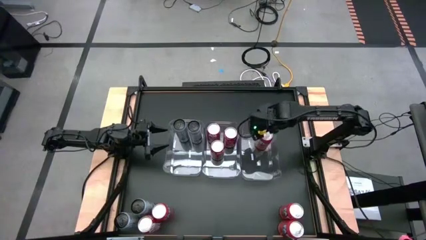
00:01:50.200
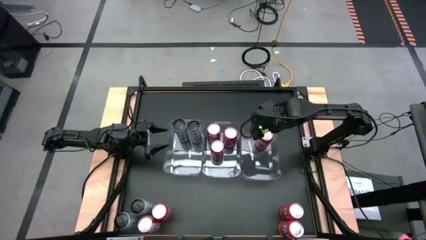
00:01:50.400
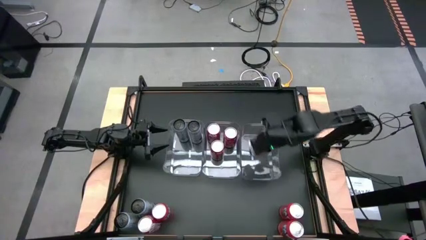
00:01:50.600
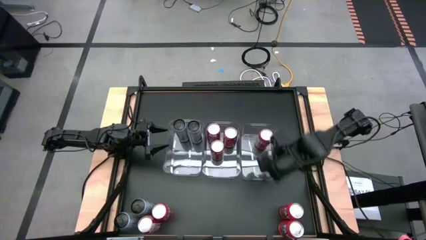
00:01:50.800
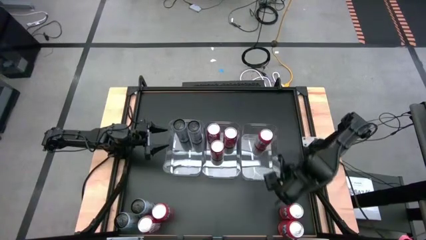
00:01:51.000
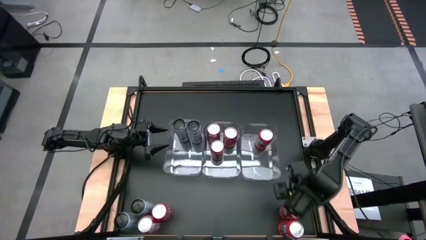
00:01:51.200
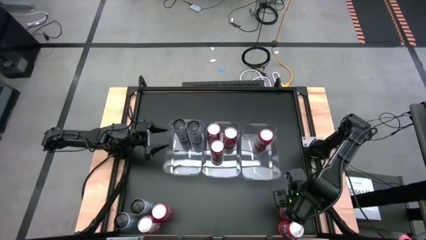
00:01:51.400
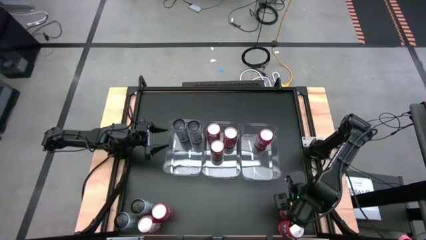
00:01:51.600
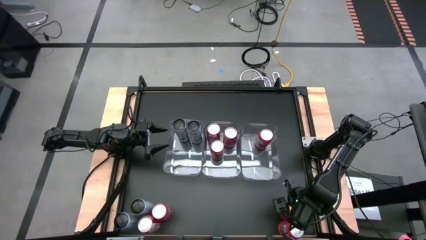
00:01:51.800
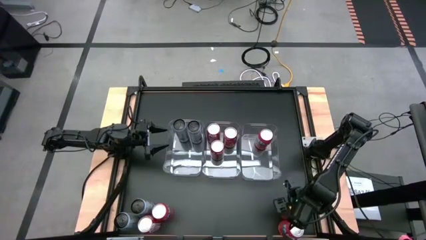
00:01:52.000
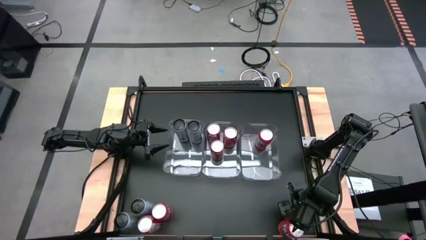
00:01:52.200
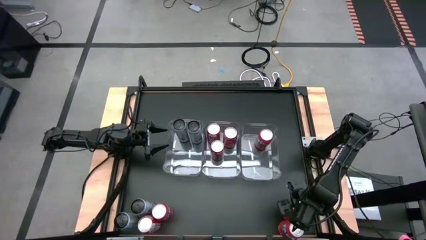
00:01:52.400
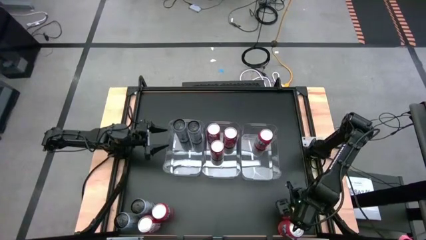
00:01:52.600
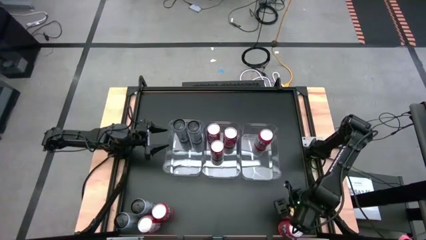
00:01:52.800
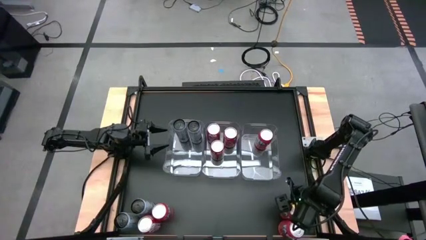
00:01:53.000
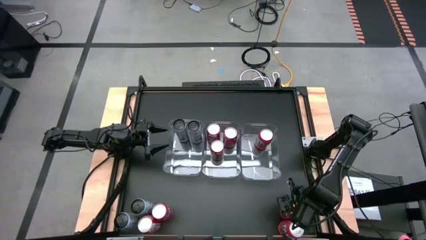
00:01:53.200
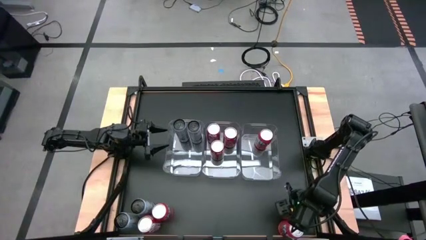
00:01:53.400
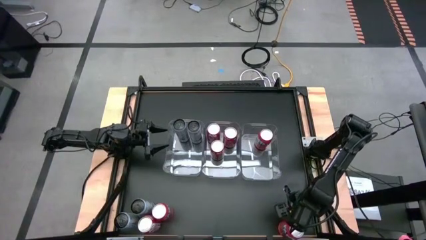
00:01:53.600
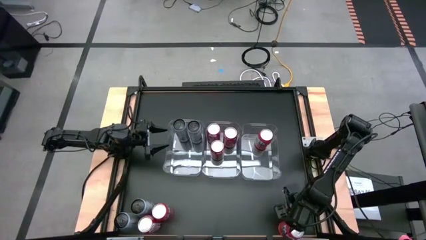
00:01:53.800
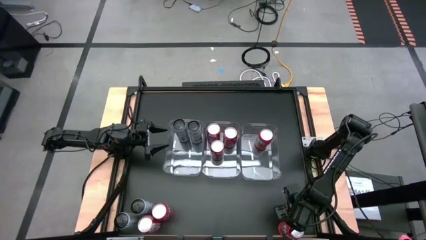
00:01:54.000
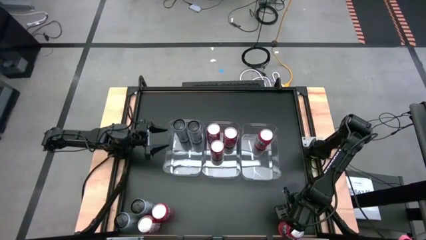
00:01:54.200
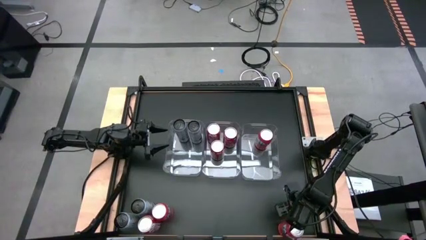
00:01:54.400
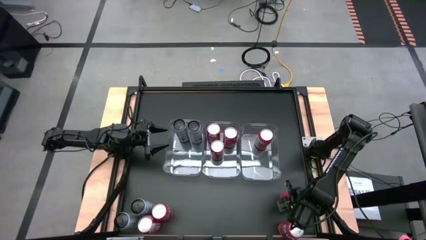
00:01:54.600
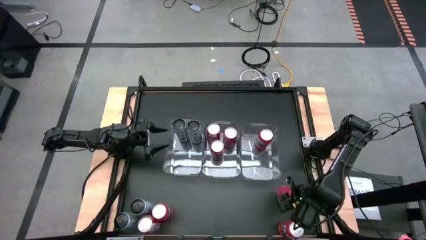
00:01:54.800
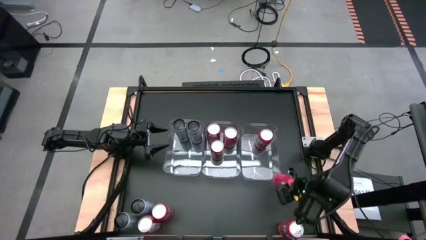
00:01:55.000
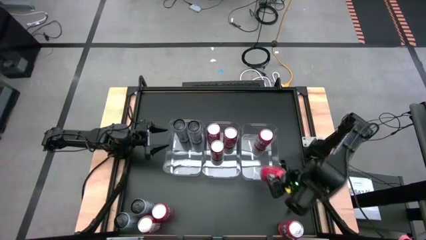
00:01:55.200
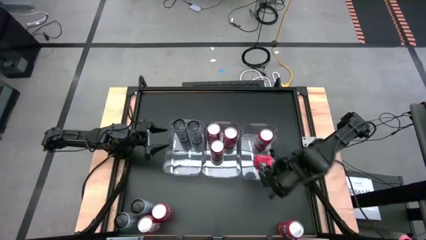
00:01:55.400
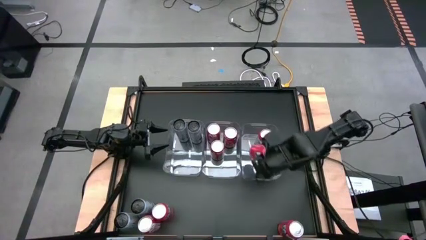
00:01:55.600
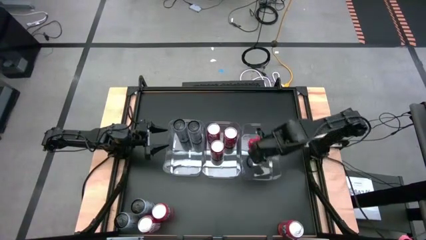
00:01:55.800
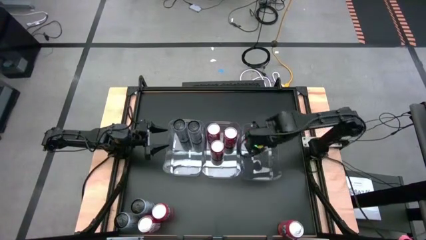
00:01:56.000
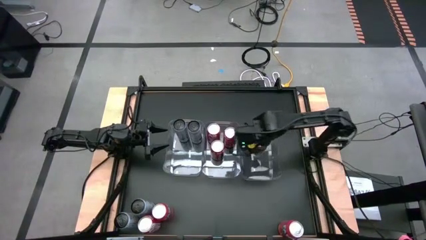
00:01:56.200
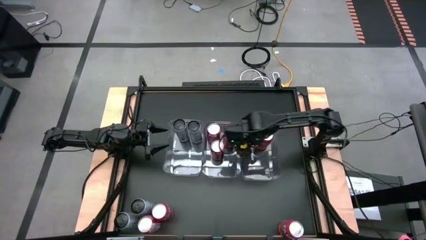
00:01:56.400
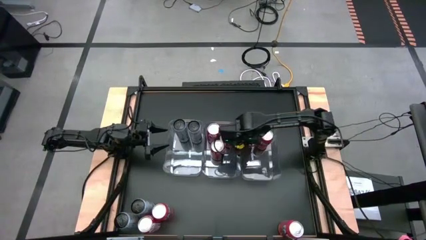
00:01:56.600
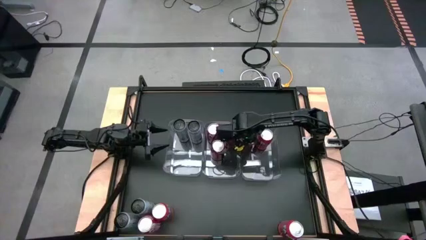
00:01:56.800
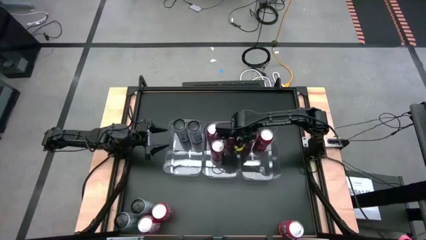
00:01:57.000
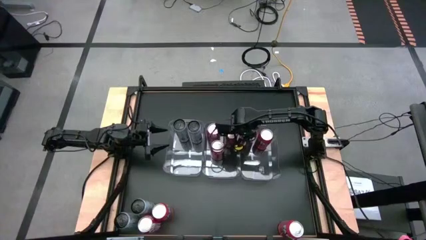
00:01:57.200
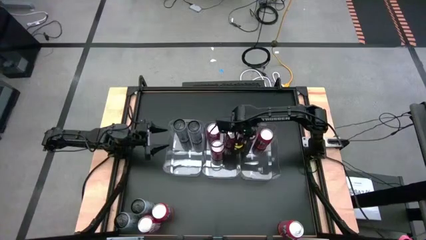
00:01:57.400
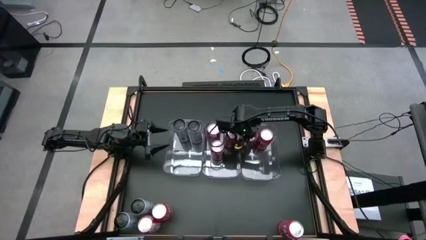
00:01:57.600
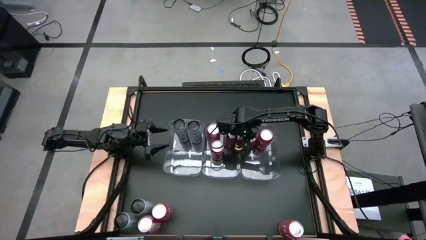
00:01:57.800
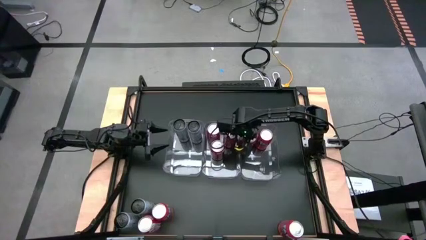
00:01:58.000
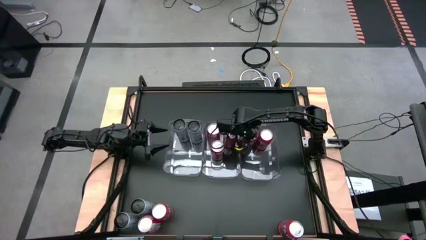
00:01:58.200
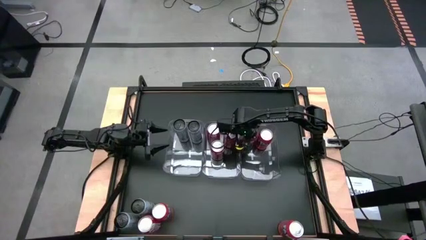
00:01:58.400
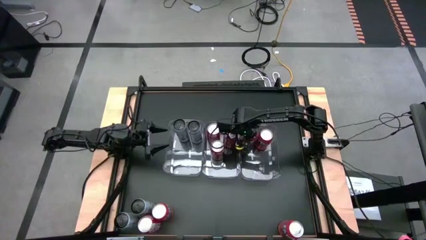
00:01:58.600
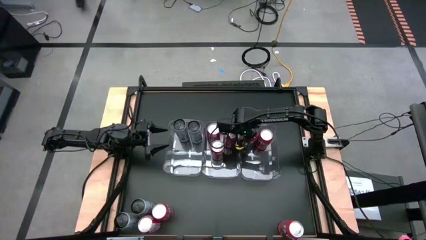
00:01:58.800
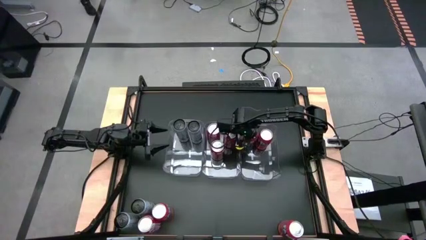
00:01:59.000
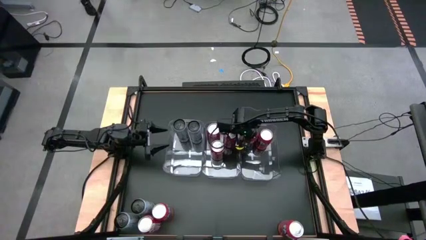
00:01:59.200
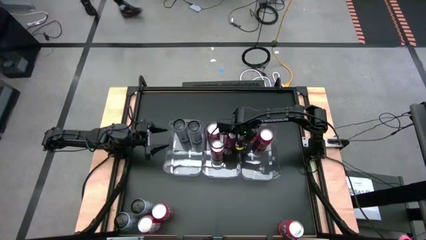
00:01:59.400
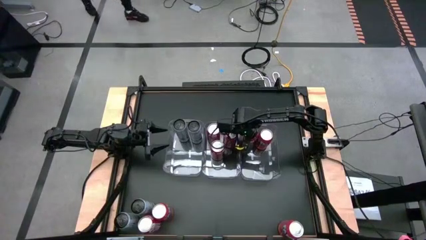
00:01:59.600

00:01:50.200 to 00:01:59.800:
Task: Sort soda cans
Put the red soda can into the right transparent bin

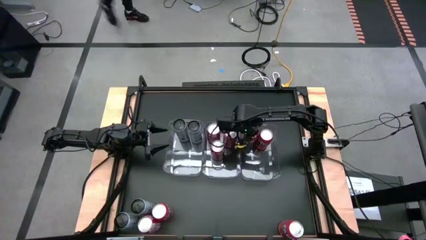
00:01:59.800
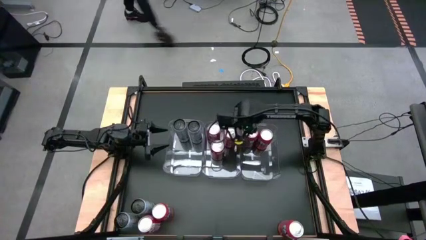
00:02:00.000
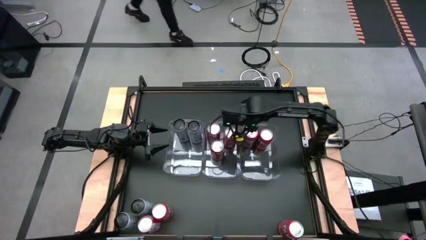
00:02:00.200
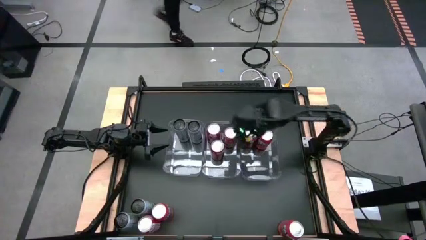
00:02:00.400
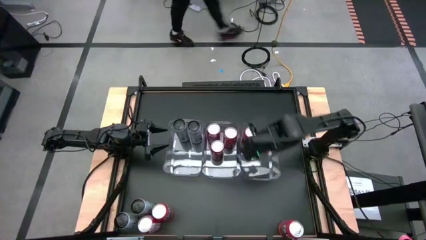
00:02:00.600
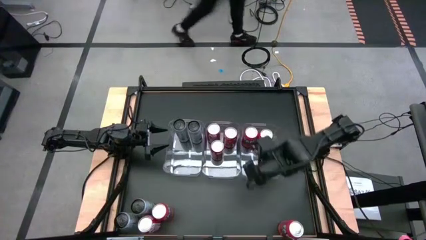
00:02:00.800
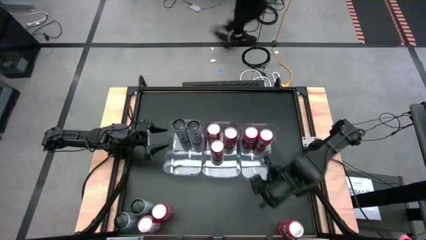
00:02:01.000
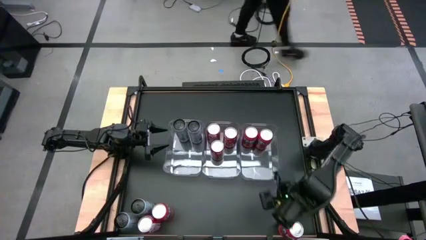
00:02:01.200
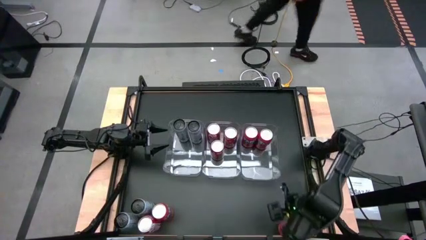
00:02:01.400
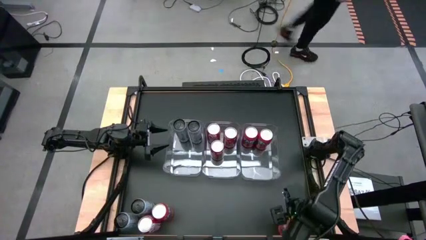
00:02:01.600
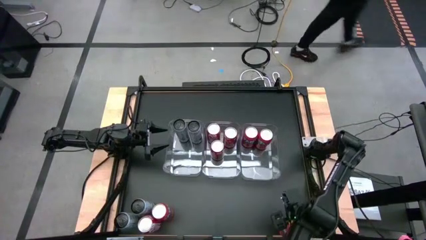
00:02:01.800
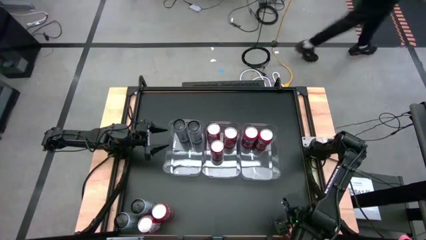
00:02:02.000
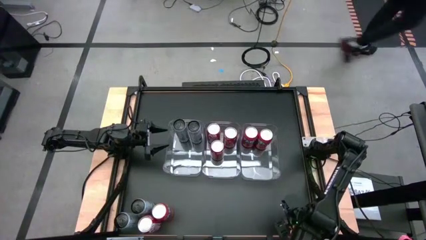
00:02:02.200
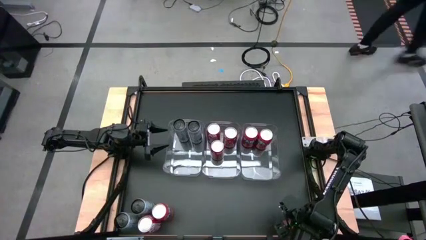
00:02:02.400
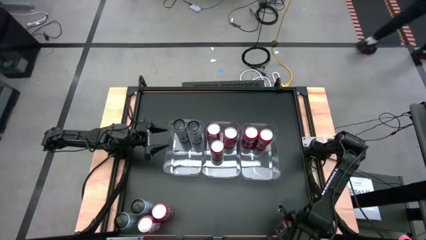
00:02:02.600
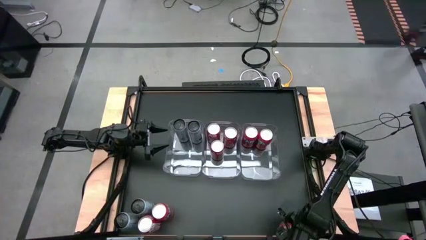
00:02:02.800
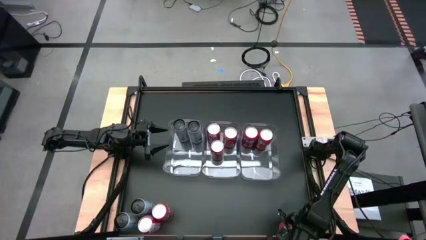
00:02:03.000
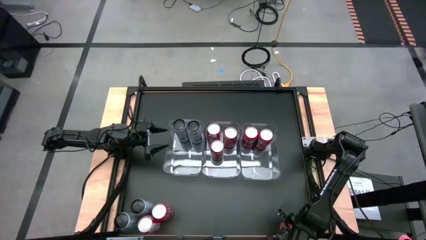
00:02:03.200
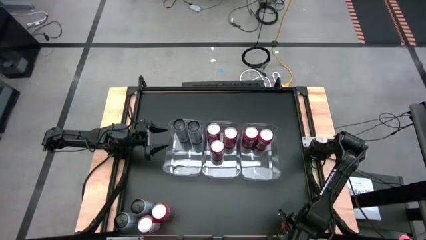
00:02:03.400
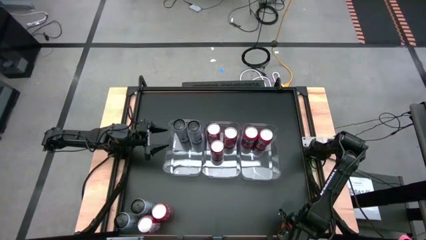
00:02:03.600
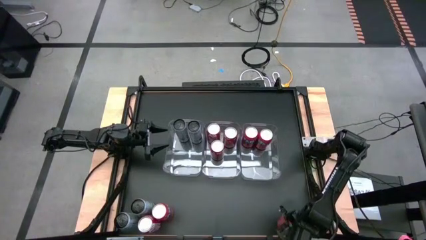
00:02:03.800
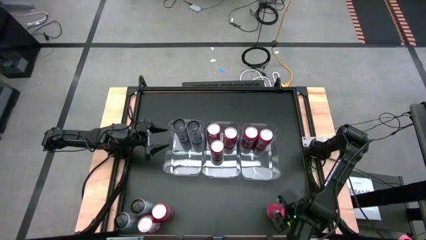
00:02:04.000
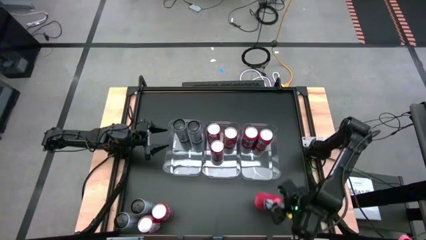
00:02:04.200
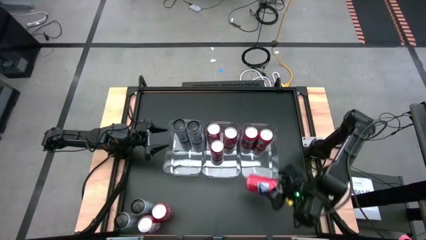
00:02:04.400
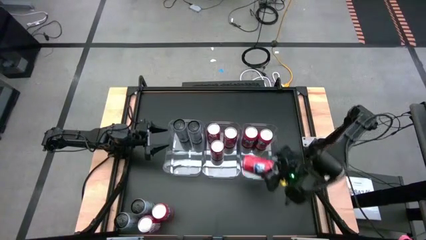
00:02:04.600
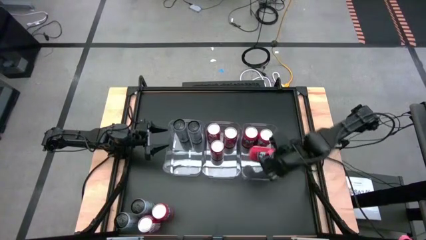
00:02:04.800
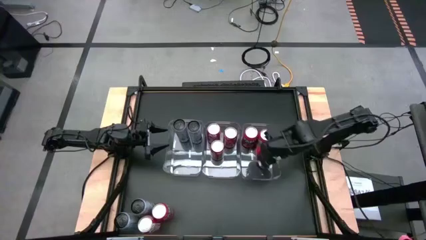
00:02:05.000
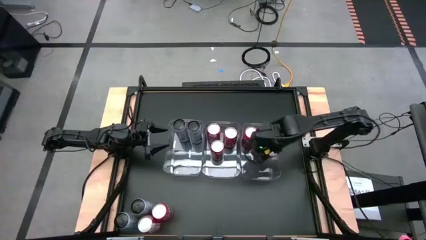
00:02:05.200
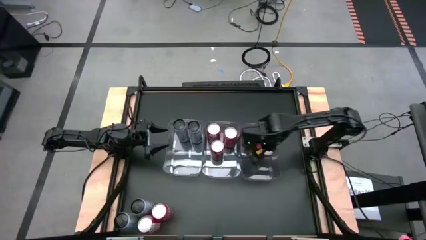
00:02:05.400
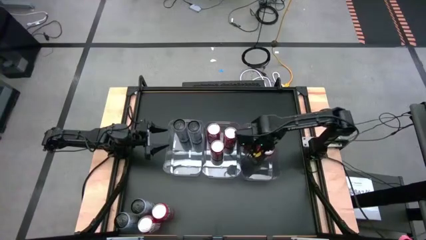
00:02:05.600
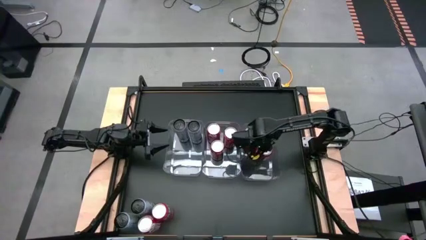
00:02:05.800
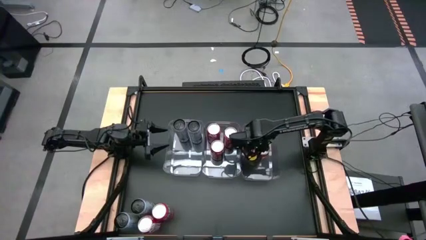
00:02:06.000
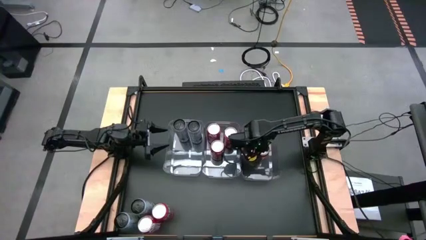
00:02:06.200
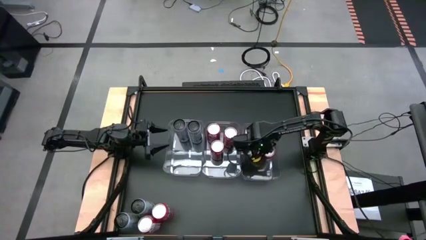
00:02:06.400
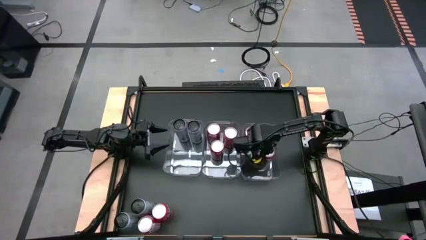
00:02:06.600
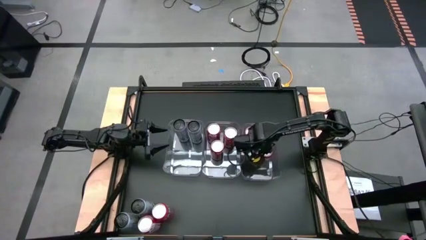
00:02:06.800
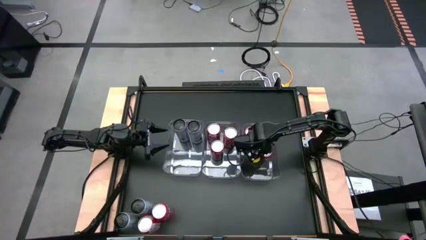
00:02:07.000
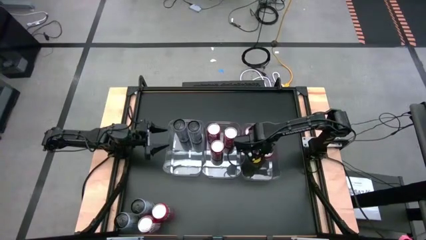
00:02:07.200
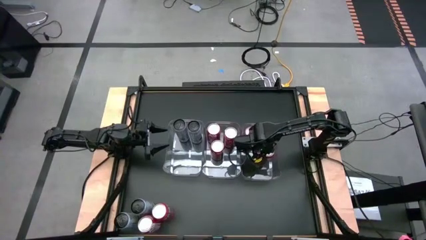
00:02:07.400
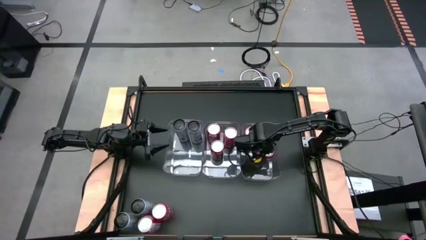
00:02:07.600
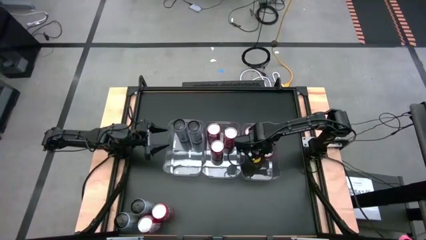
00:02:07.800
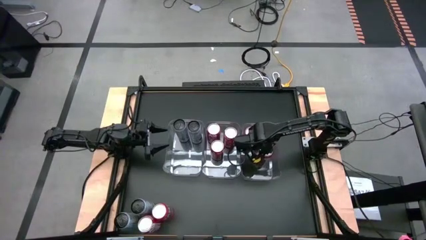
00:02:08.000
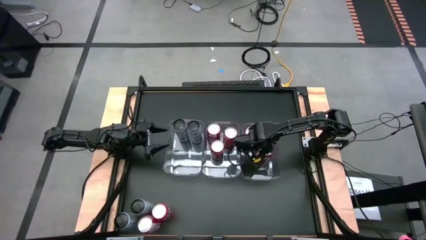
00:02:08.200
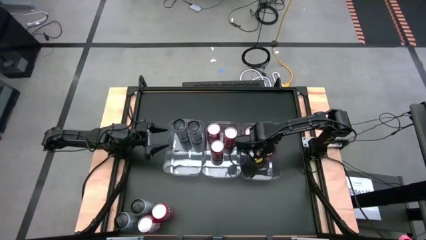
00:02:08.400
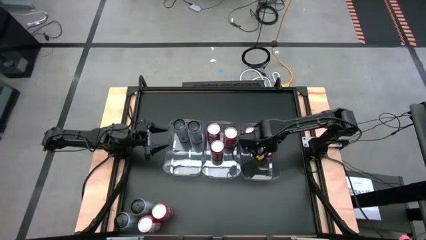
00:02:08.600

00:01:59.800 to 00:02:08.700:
Put the red soda can into the right transparent bin
